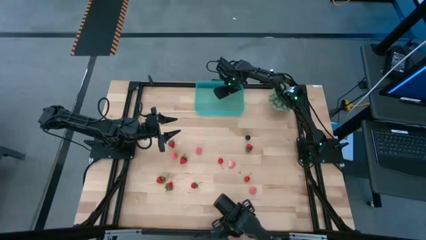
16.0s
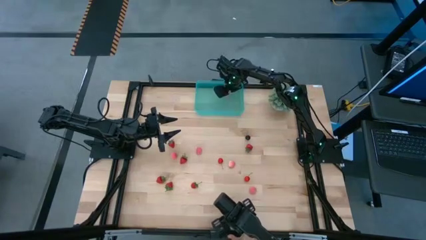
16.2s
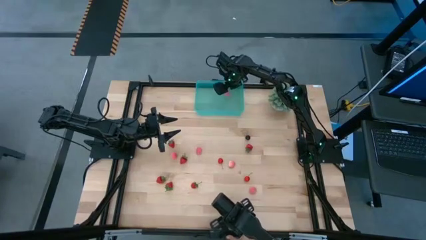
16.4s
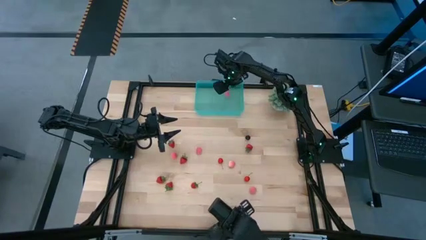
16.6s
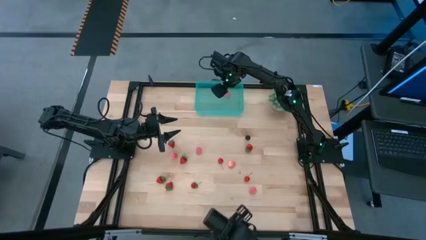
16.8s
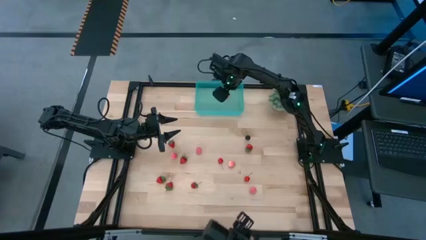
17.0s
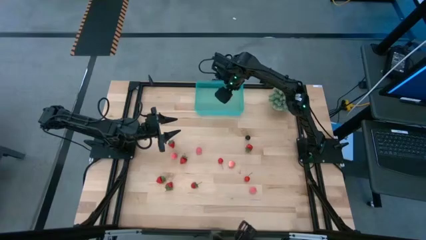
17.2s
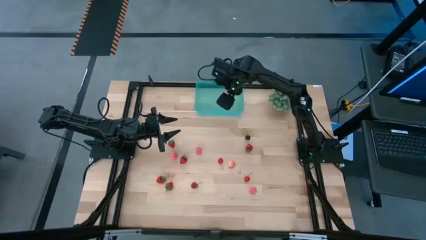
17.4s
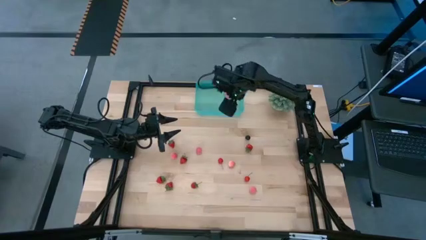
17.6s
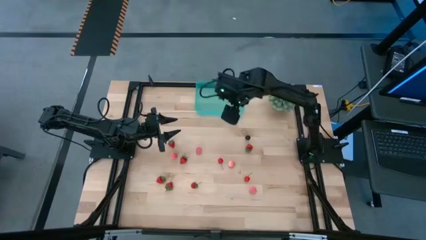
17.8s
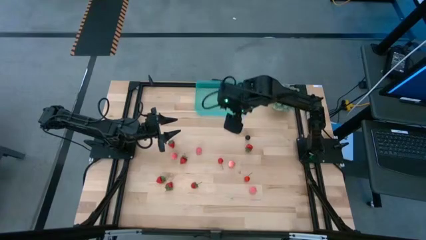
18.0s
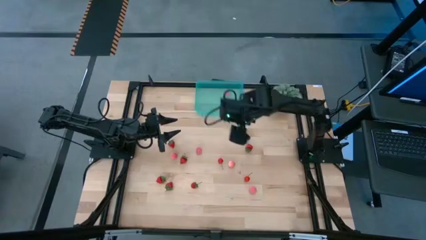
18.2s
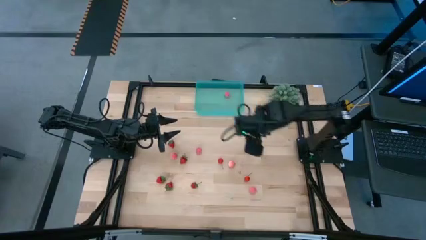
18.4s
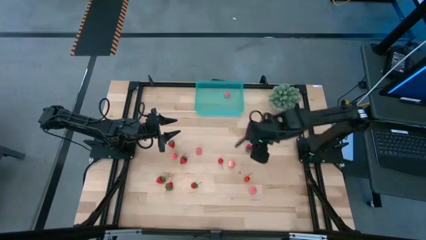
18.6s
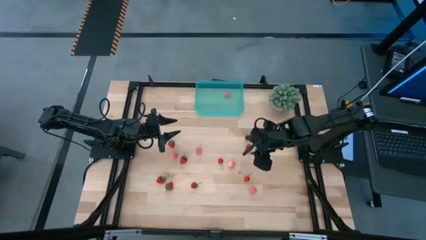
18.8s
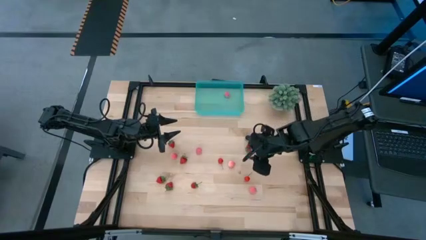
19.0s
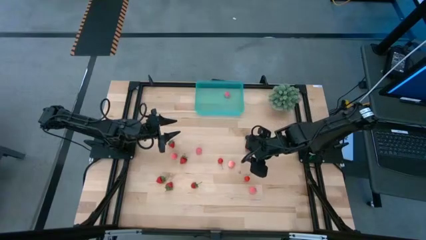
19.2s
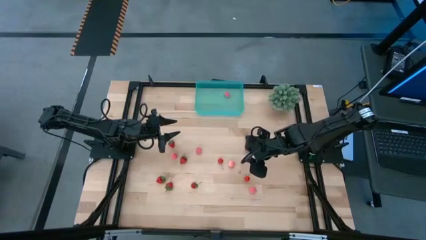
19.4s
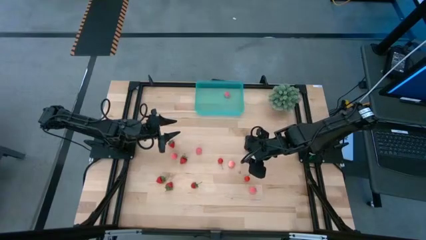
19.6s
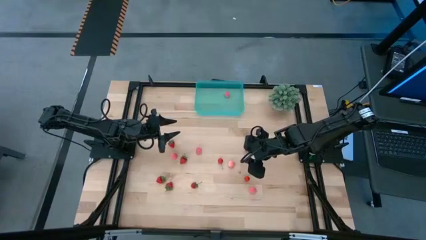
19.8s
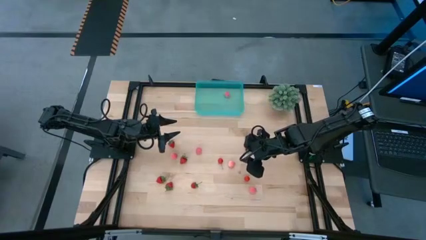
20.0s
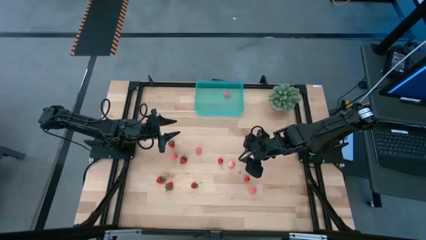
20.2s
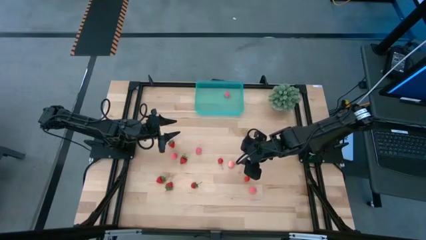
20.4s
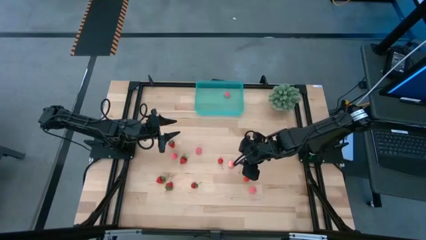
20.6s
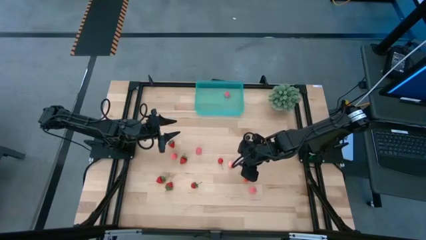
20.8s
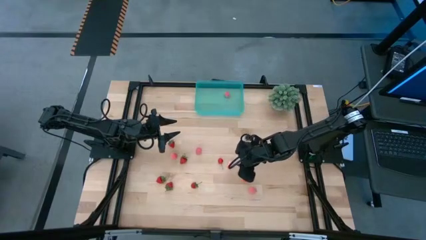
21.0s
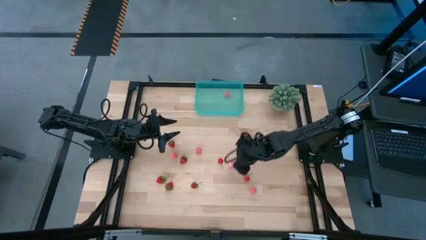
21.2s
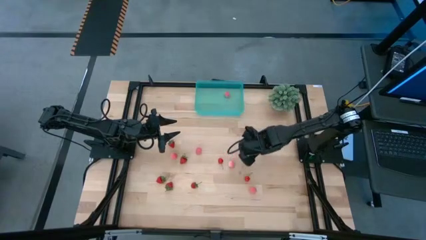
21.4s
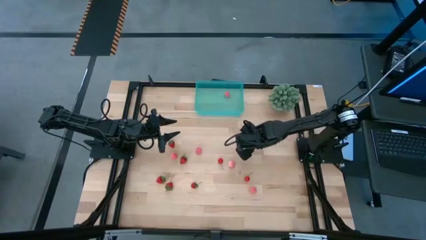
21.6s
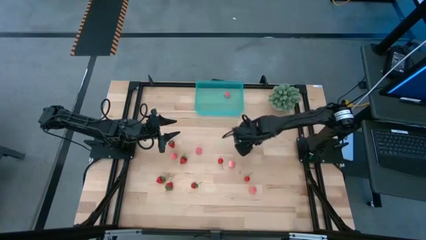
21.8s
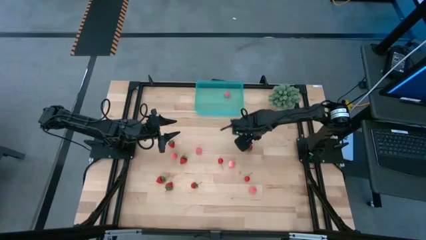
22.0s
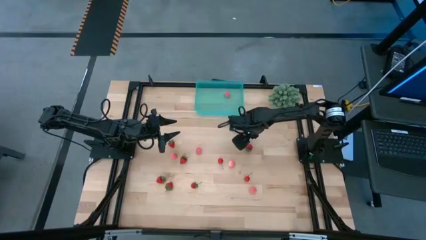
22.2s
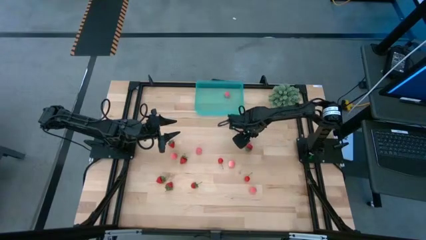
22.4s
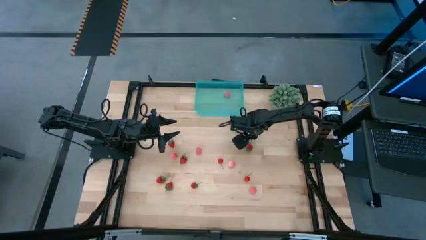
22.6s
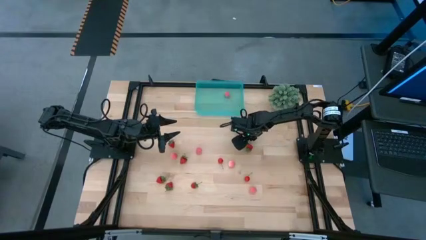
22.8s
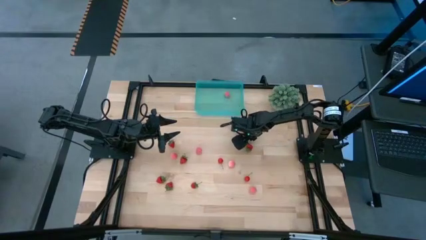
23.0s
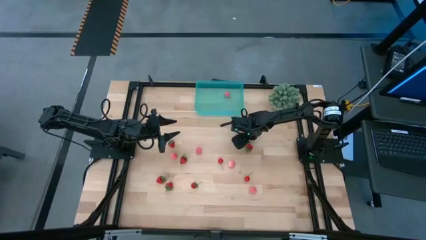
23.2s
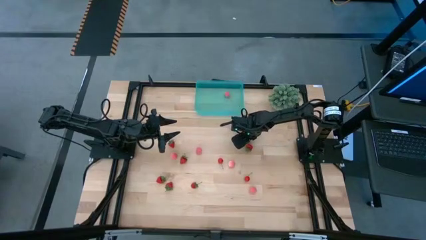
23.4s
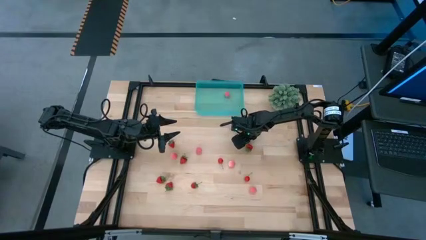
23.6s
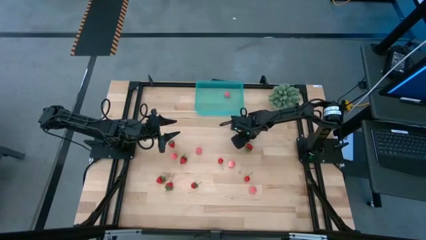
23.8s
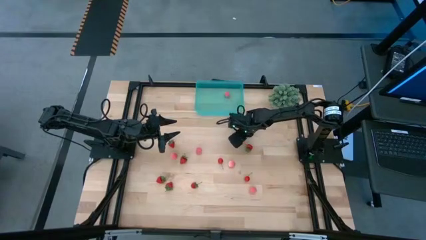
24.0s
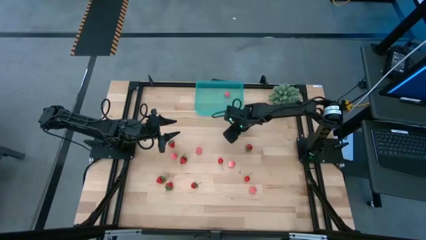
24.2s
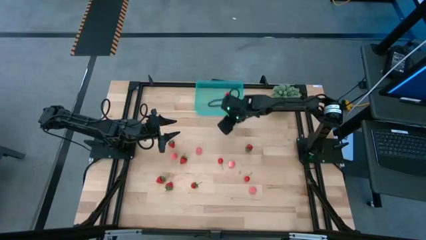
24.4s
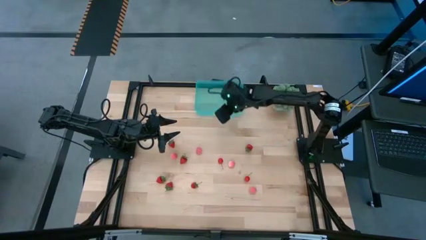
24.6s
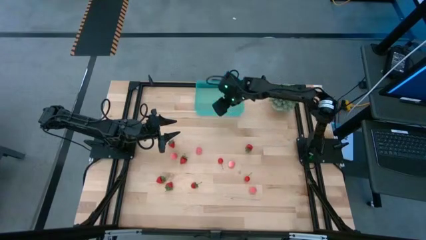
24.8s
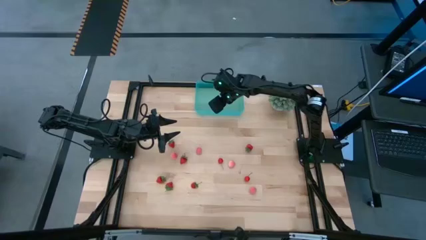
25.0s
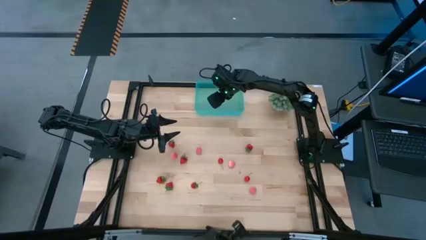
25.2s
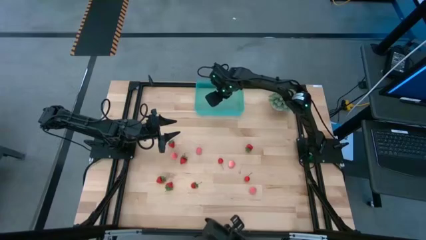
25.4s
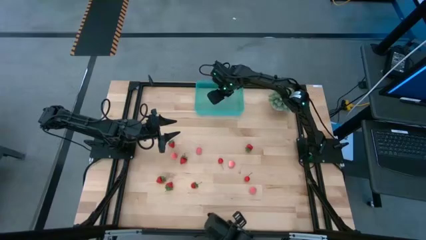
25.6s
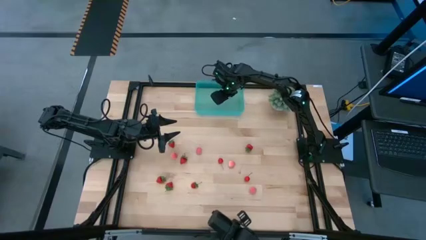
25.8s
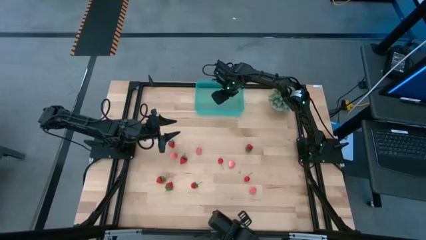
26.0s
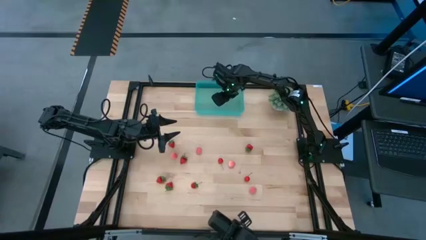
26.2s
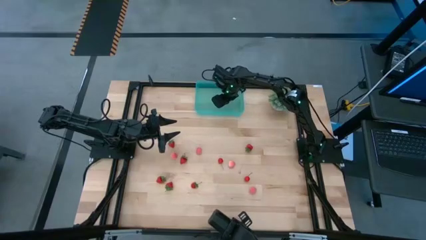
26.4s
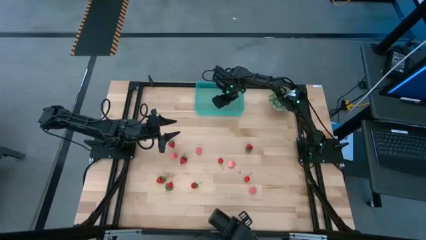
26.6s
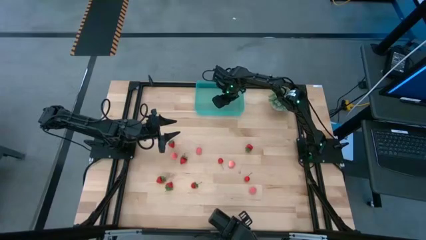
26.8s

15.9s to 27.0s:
Task: Pick and placing Produce into tupperware
Put the black cherry into the blue basket
